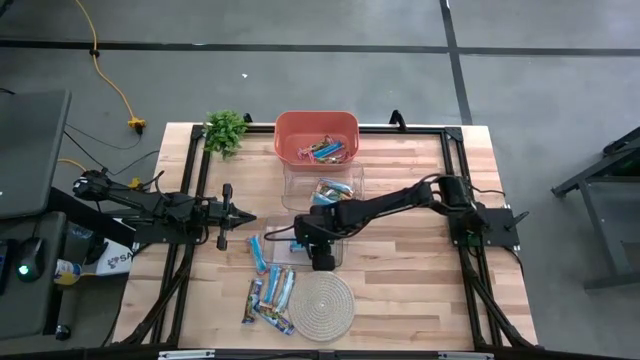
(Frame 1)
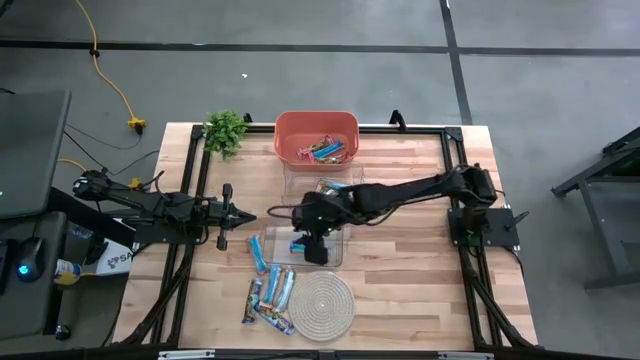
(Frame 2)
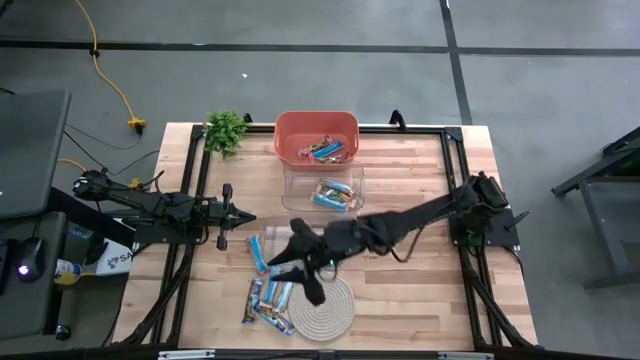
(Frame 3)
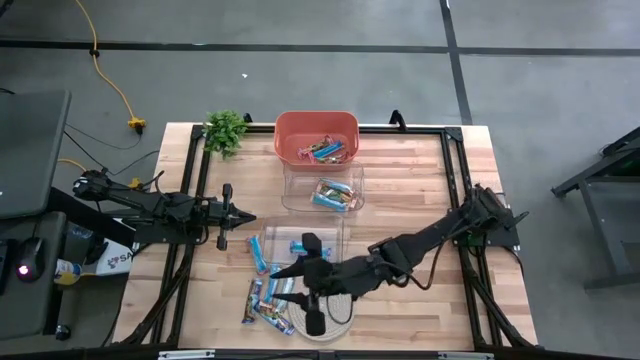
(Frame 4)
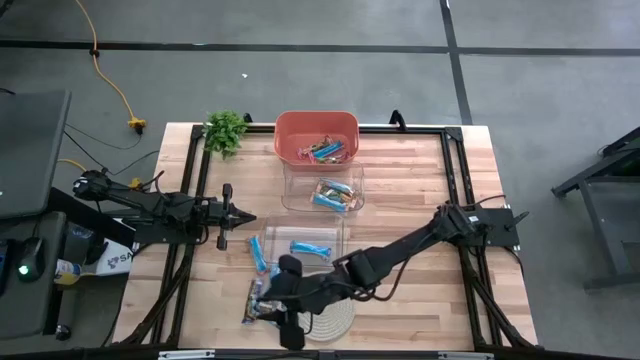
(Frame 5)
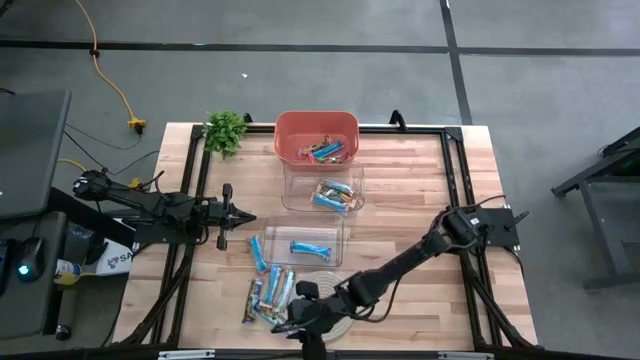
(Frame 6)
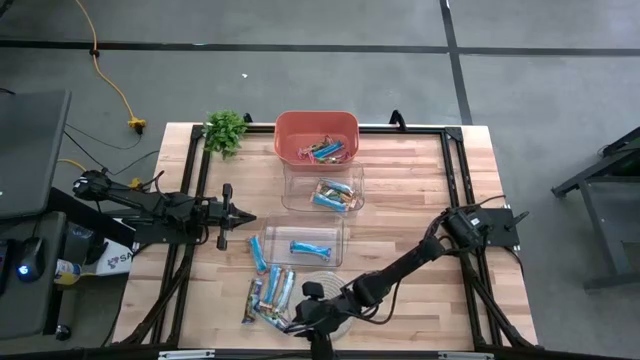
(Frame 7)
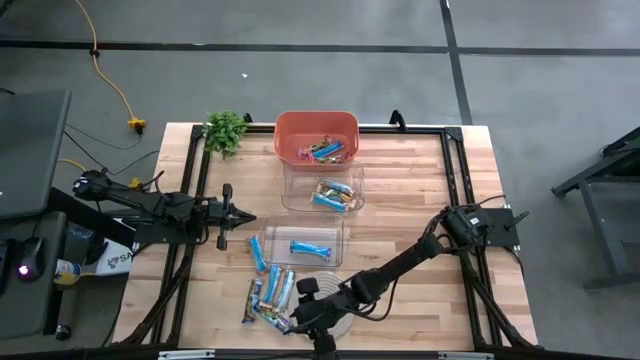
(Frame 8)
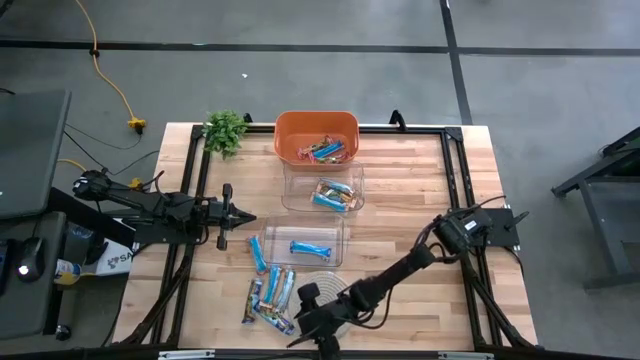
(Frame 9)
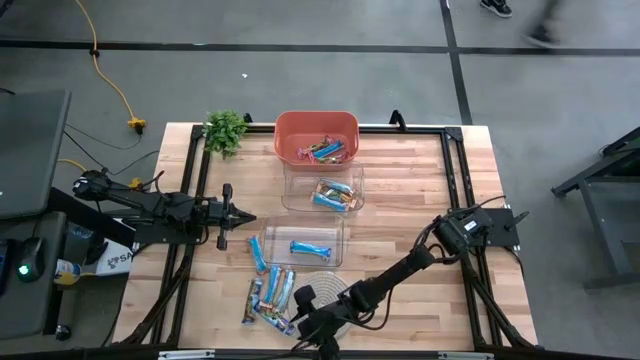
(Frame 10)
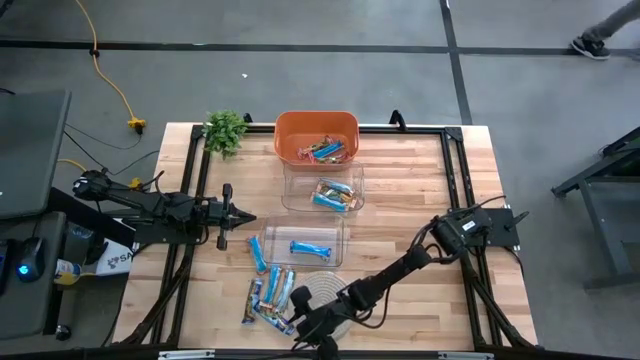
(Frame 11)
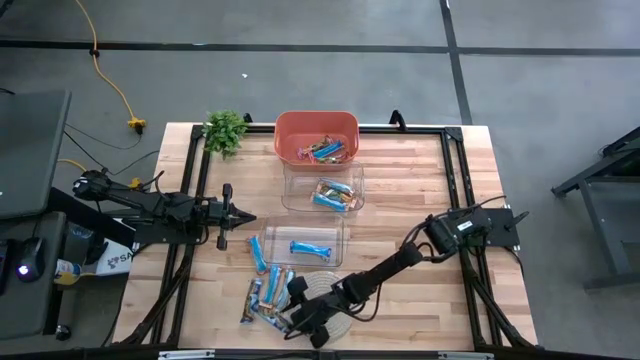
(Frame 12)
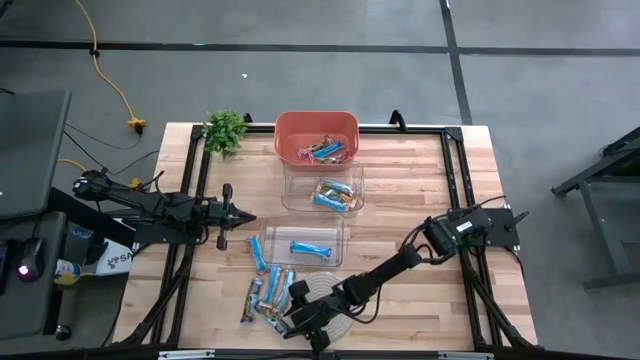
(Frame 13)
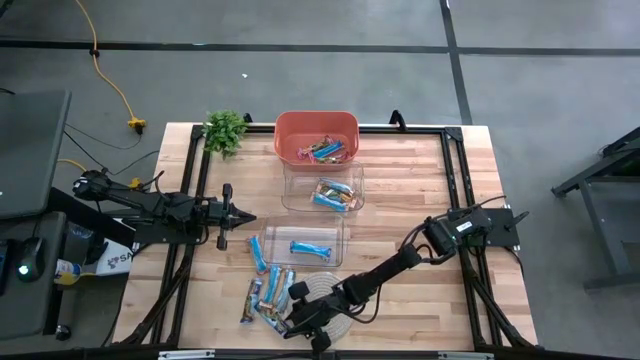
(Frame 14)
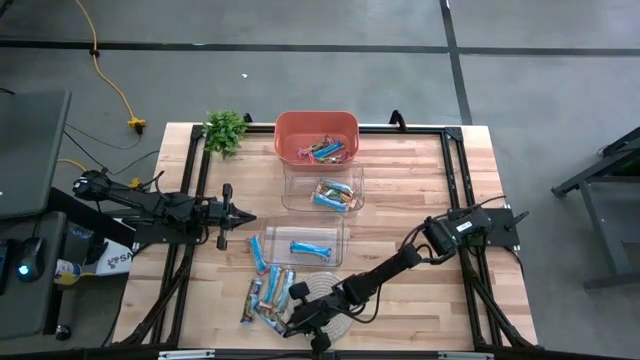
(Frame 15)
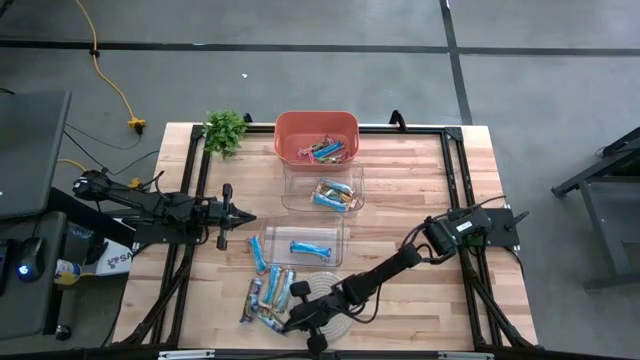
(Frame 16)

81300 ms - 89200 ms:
Task: Pick and place Granola Bars by type
Put the blue granola bar into the bottom transparent bin

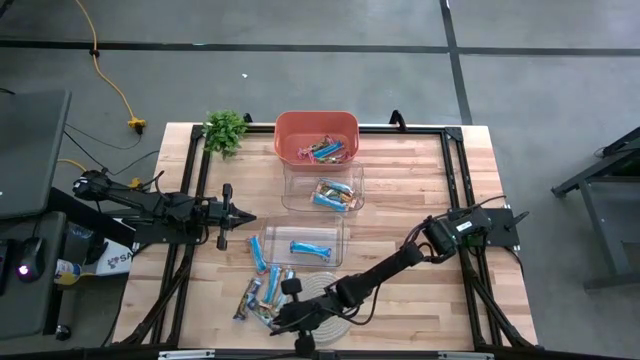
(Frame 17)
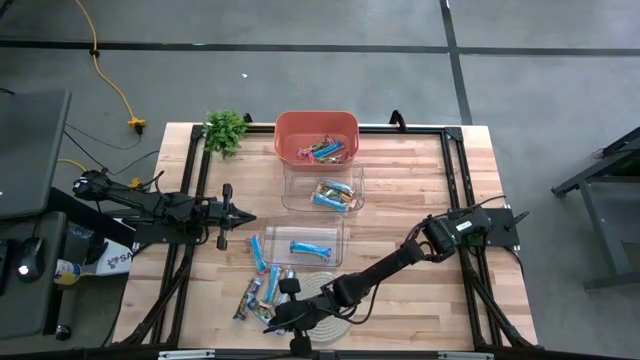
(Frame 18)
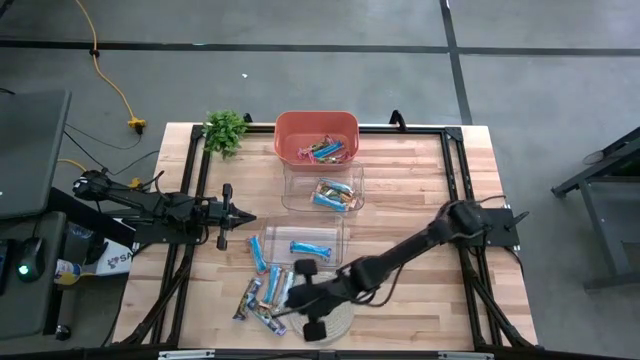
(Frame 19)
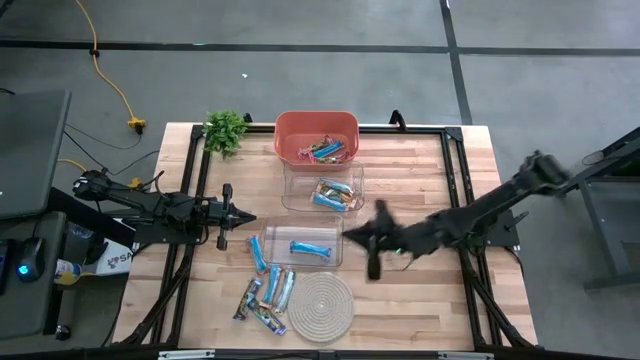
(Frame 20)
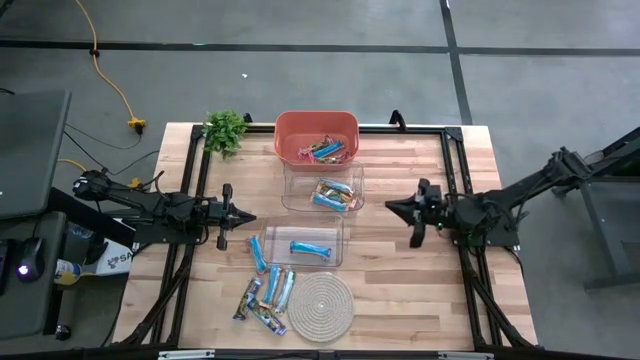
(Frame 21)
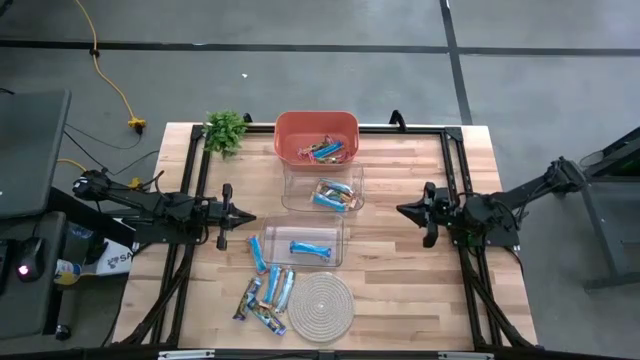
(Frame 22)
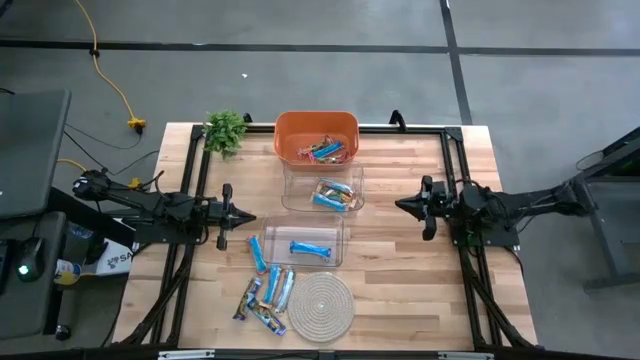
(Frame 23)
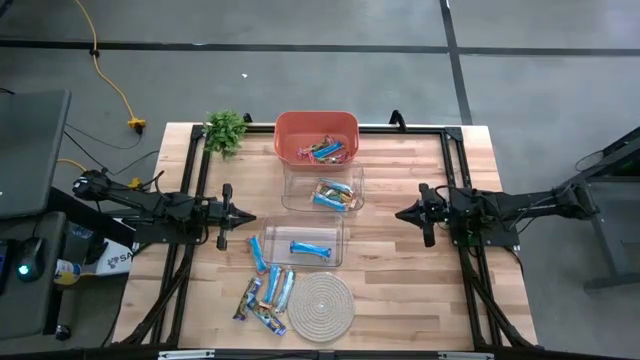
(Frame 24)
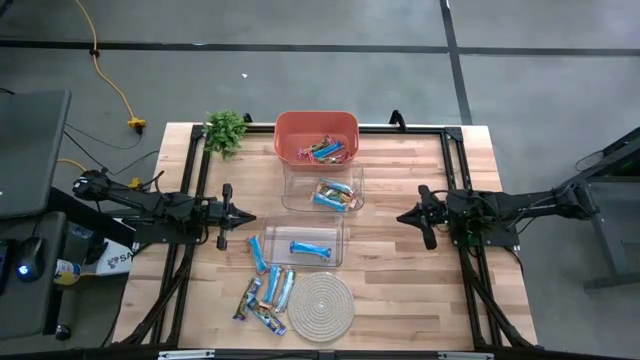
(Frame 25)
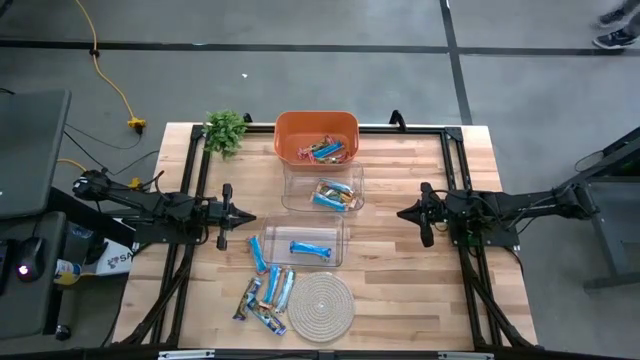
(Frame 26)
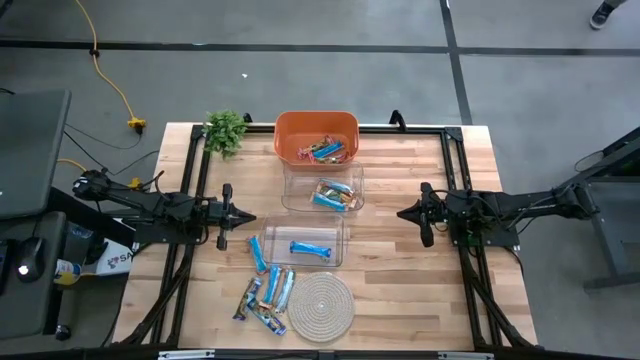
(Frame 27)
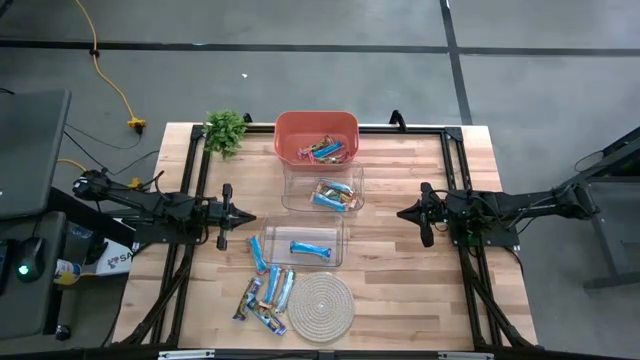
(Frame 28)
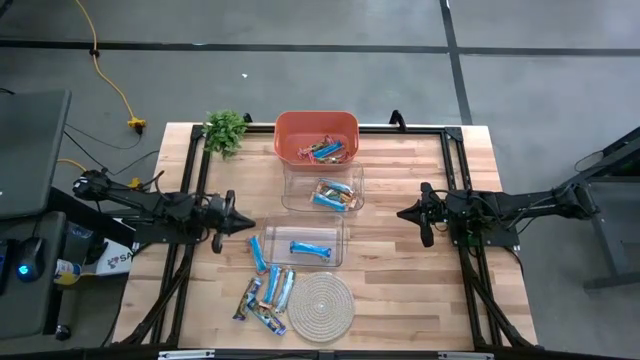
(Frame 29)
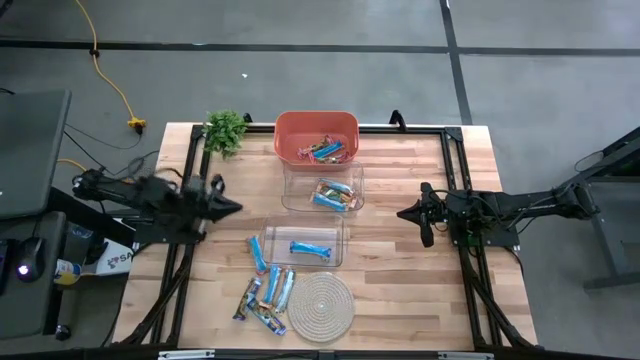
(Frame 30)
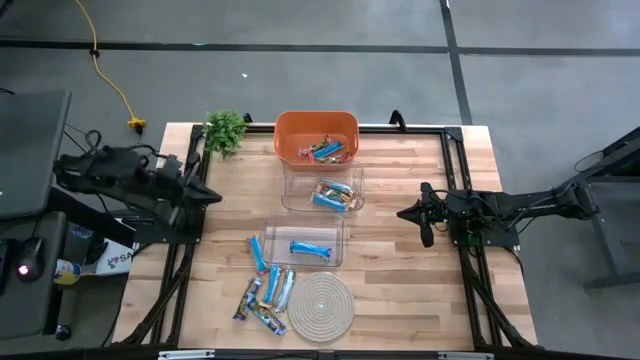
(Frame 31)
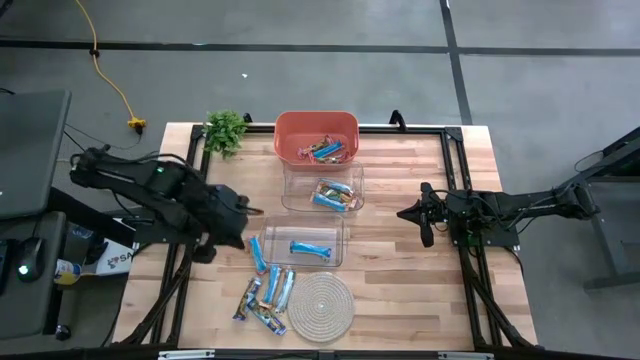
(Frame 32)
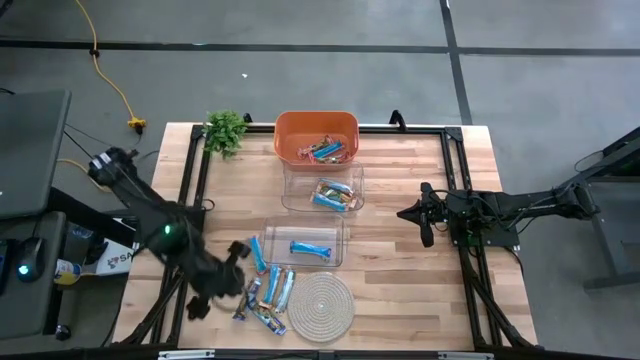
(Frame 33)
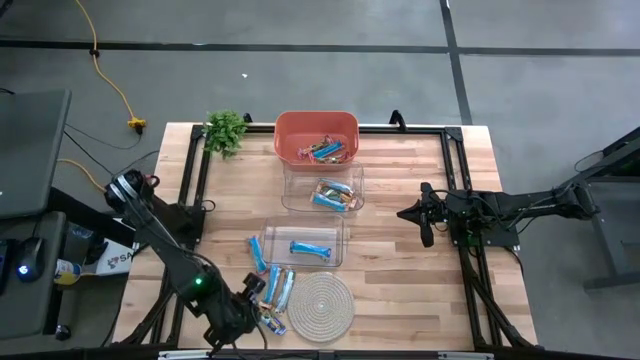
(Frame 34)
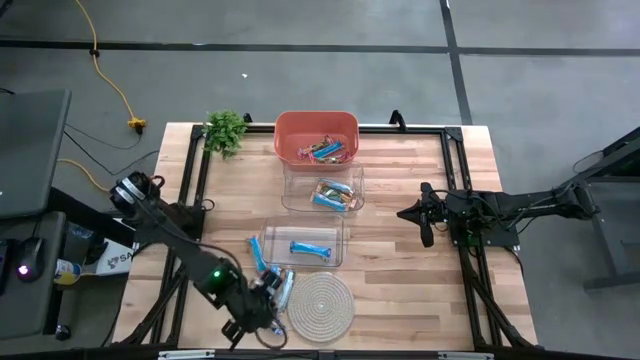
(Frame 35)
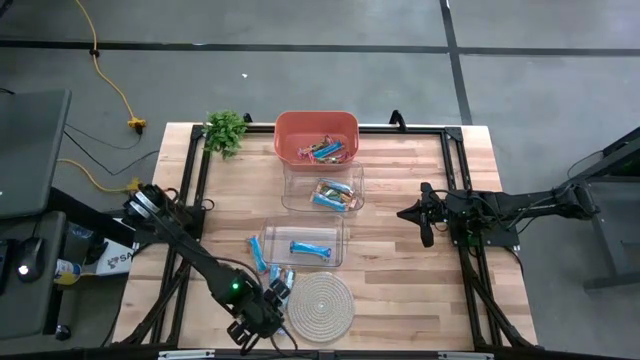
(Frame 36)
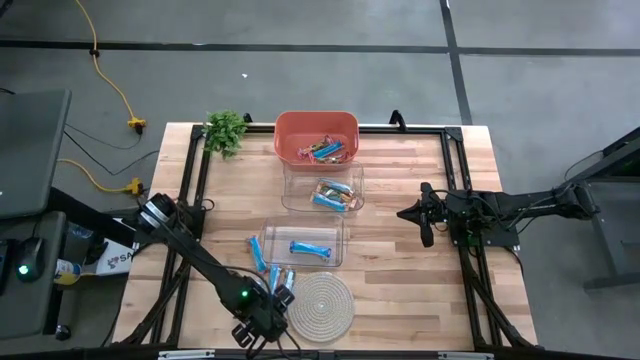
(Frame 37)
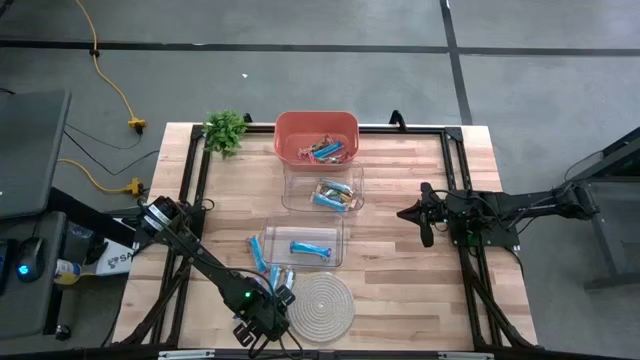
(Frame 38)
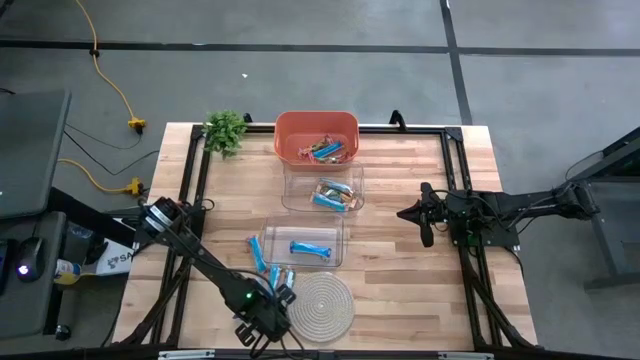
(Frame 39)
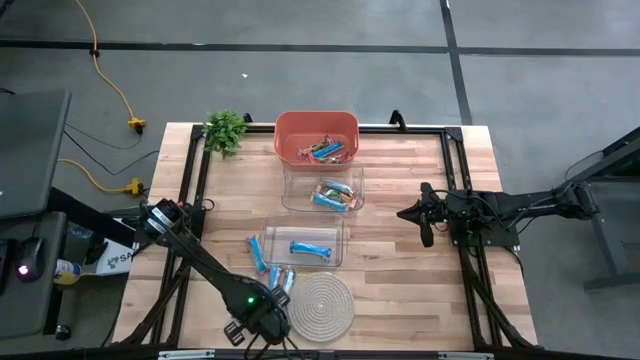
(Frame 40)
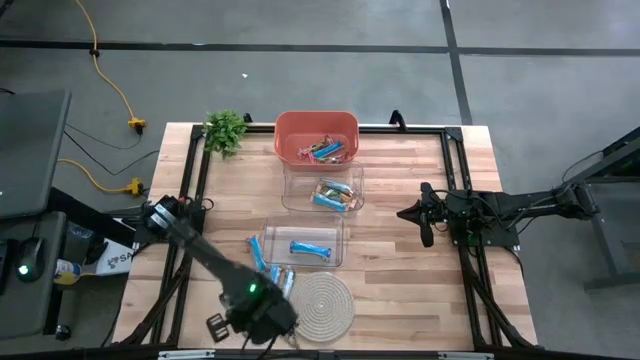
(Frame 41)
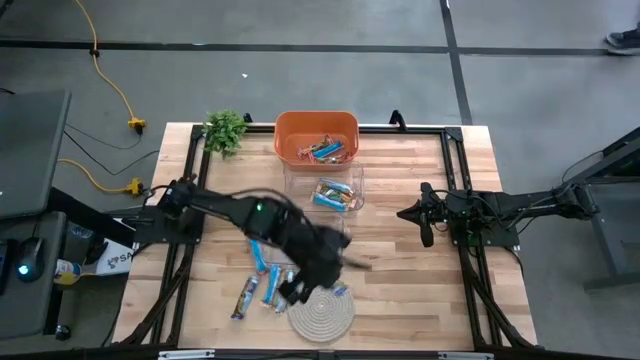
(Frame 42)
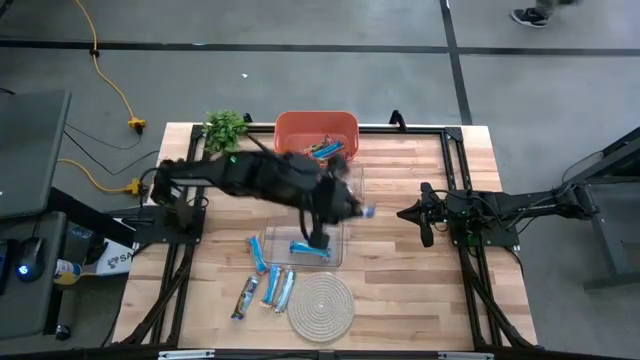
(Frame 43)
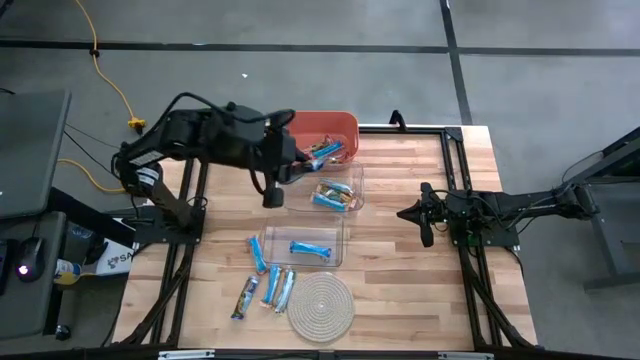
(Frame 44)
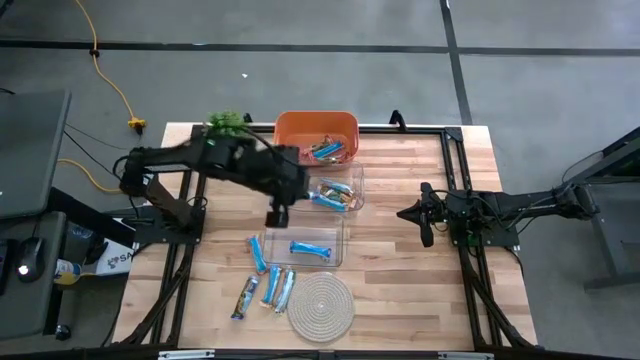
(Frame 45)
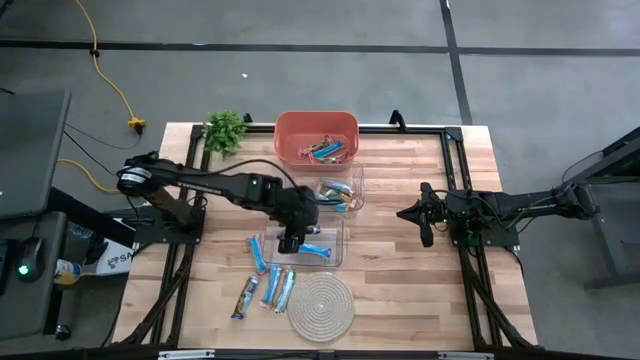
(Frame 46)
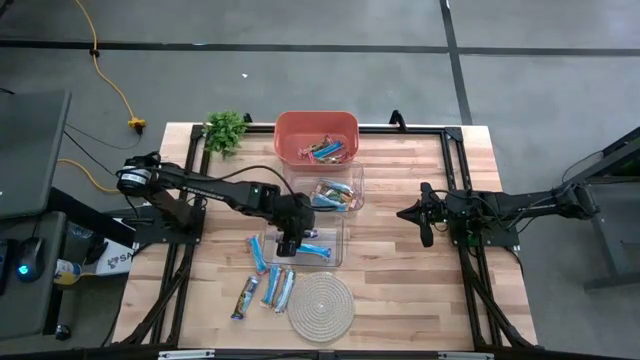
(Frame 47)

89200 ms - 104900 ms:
Put the blue granola bar into the bottom transparent bin
